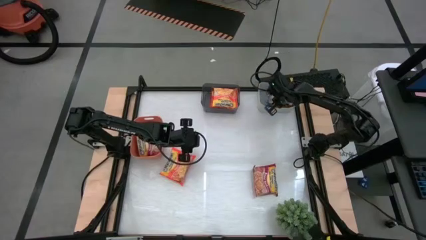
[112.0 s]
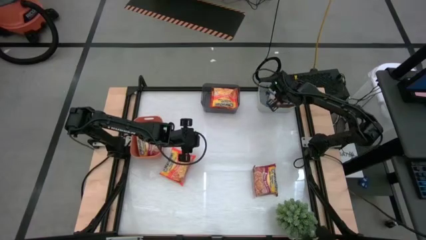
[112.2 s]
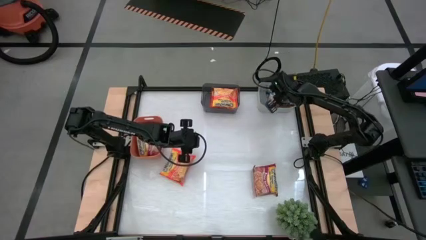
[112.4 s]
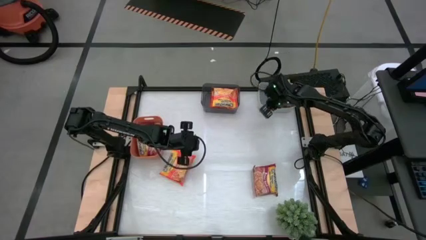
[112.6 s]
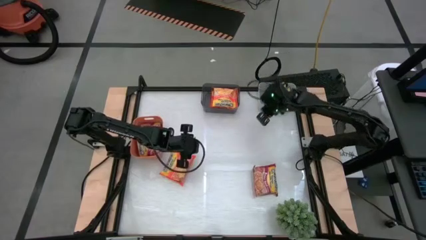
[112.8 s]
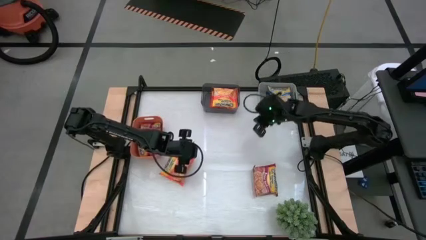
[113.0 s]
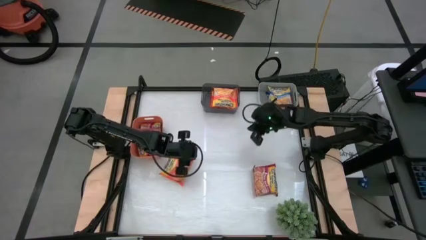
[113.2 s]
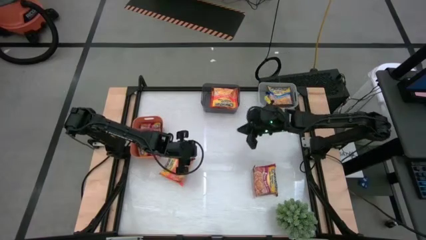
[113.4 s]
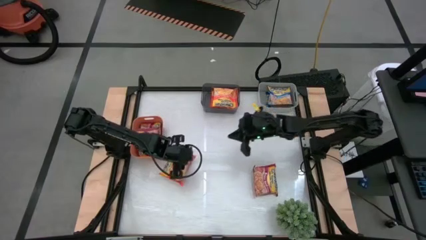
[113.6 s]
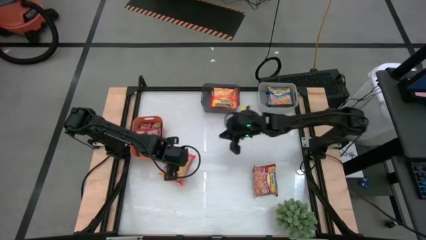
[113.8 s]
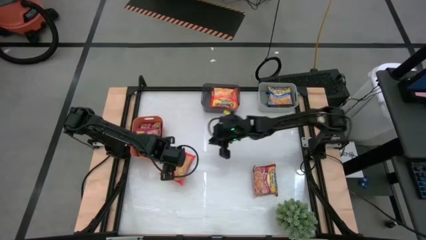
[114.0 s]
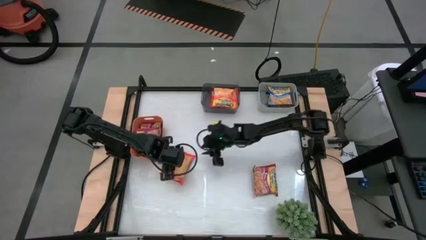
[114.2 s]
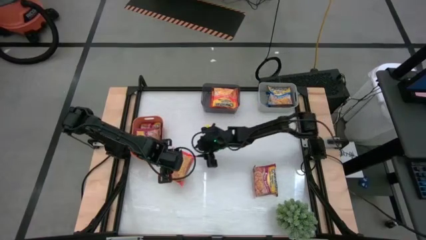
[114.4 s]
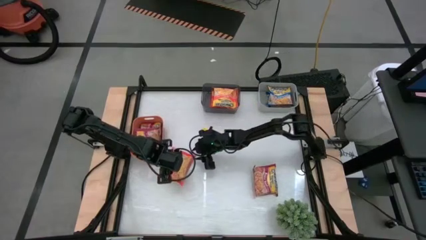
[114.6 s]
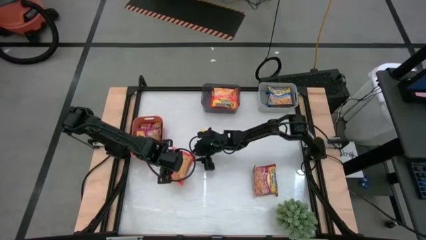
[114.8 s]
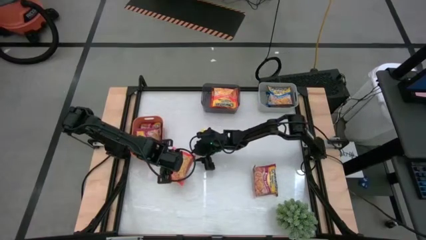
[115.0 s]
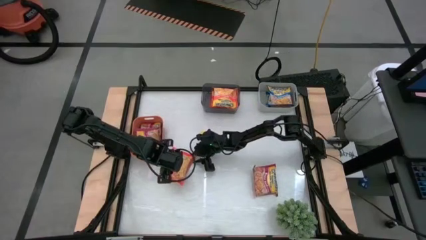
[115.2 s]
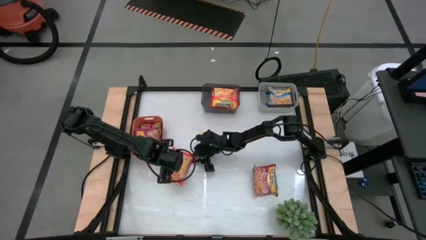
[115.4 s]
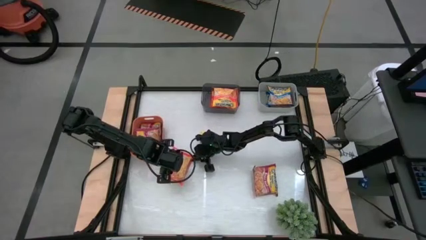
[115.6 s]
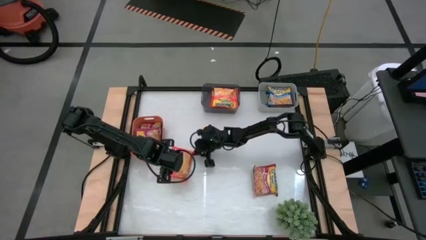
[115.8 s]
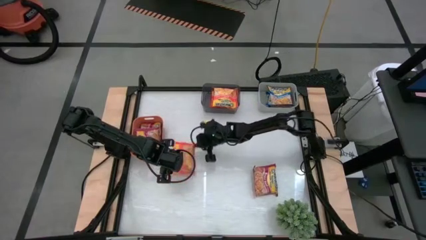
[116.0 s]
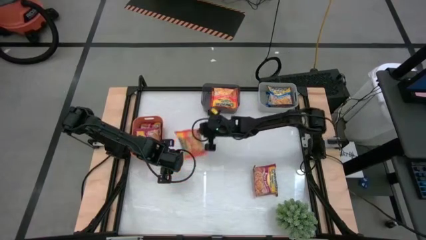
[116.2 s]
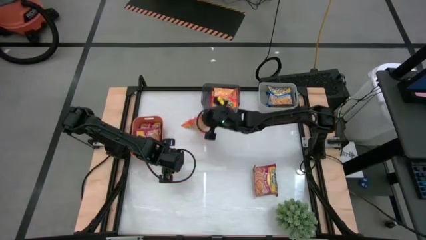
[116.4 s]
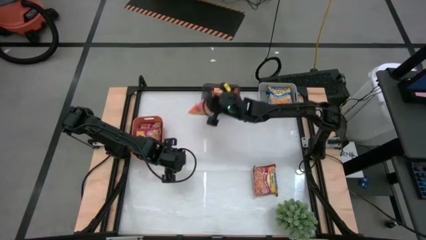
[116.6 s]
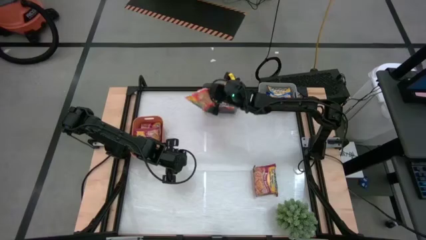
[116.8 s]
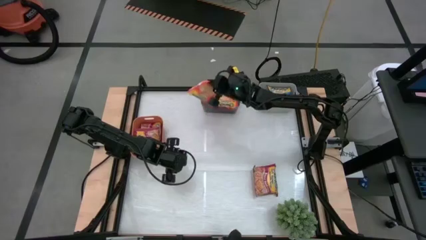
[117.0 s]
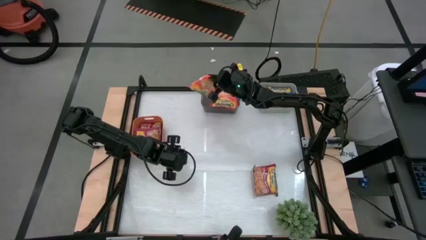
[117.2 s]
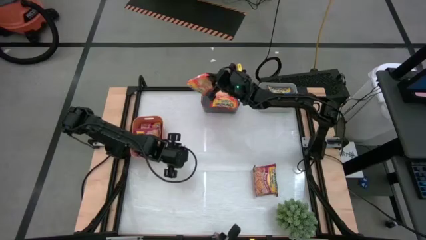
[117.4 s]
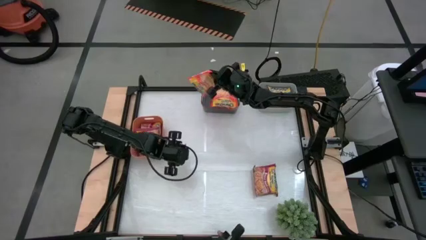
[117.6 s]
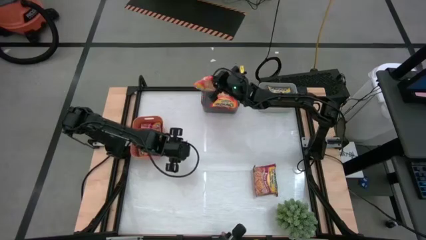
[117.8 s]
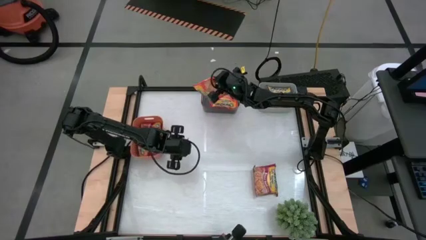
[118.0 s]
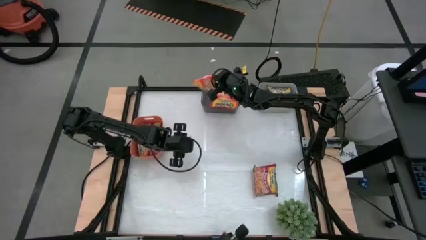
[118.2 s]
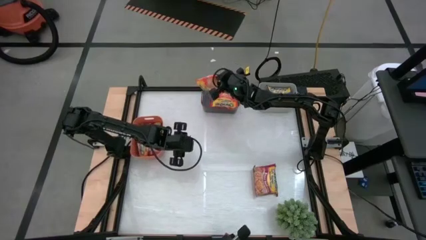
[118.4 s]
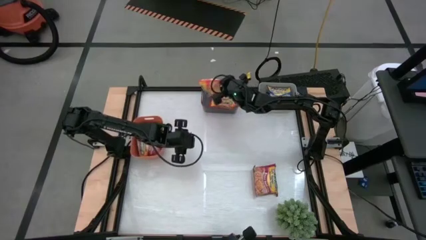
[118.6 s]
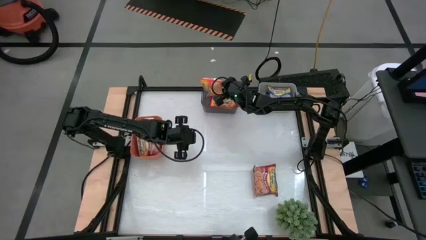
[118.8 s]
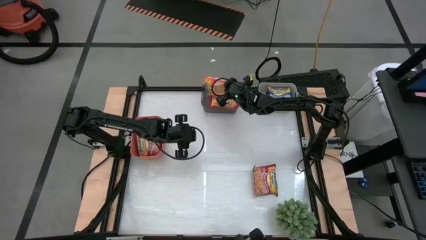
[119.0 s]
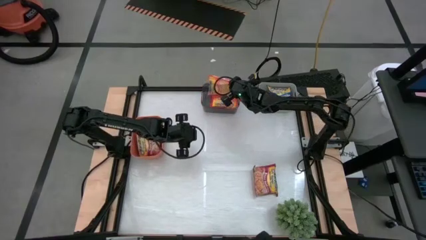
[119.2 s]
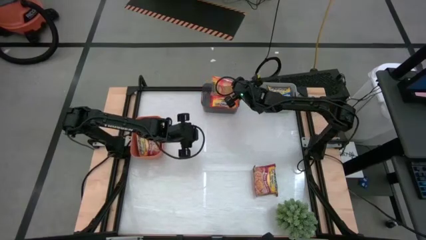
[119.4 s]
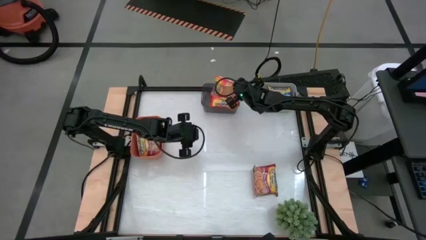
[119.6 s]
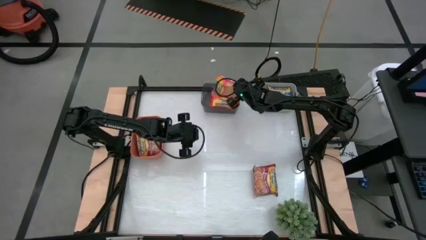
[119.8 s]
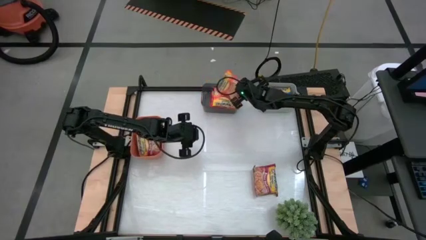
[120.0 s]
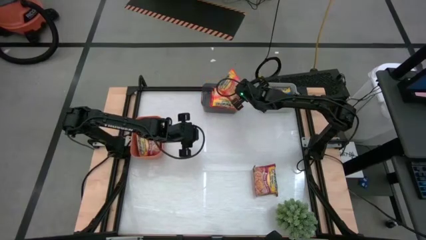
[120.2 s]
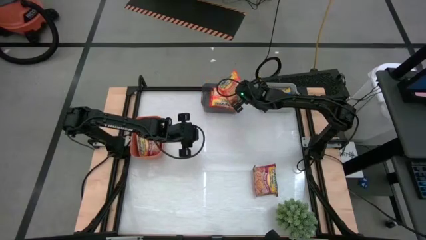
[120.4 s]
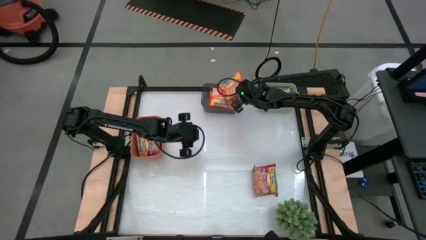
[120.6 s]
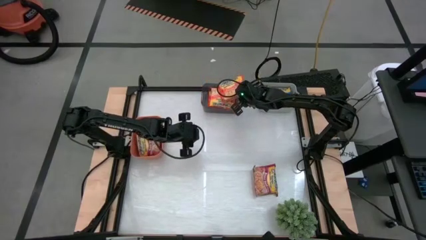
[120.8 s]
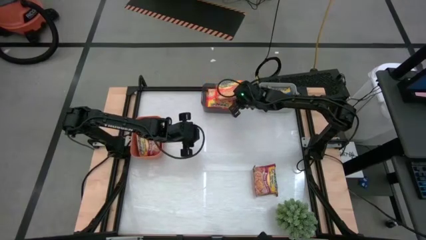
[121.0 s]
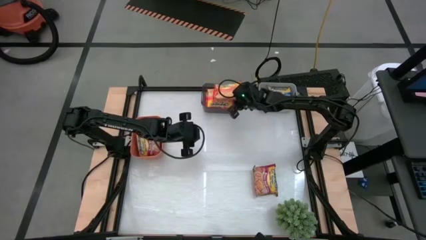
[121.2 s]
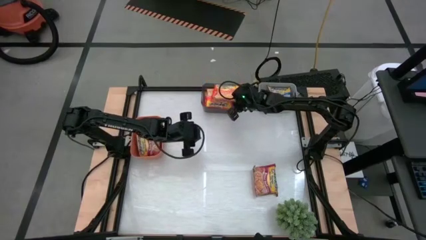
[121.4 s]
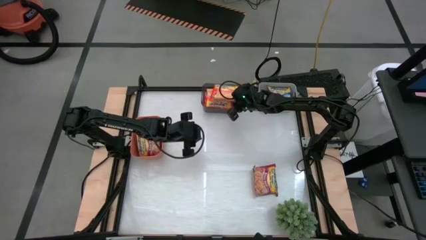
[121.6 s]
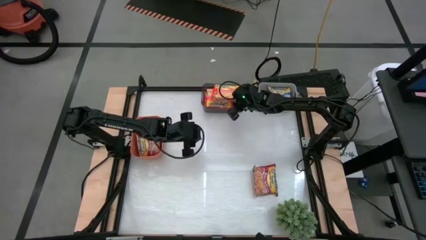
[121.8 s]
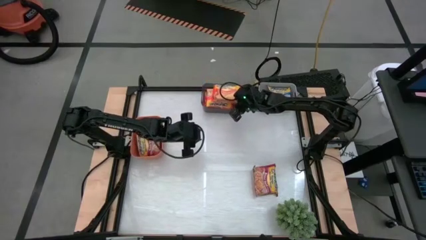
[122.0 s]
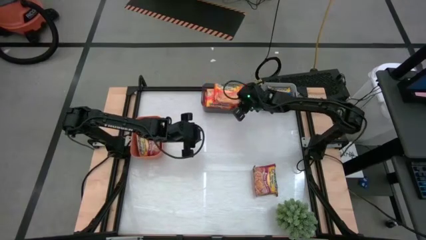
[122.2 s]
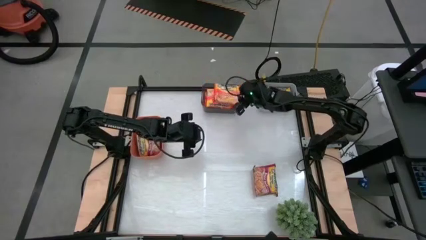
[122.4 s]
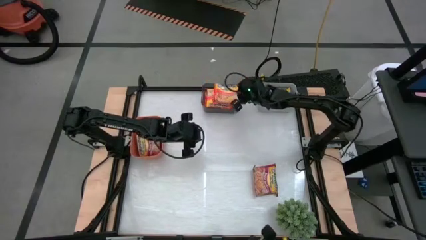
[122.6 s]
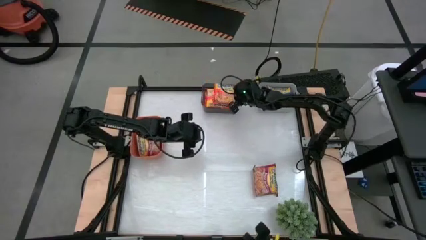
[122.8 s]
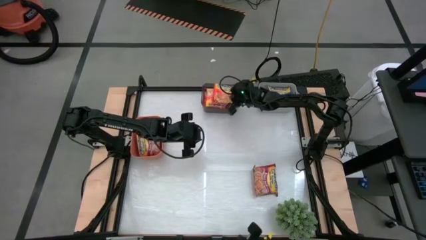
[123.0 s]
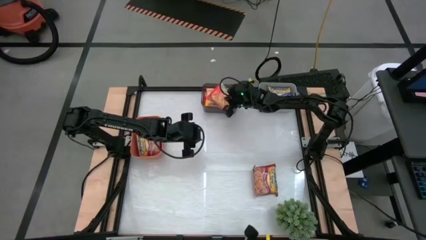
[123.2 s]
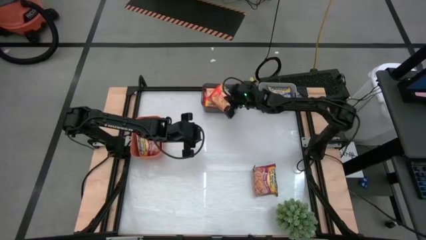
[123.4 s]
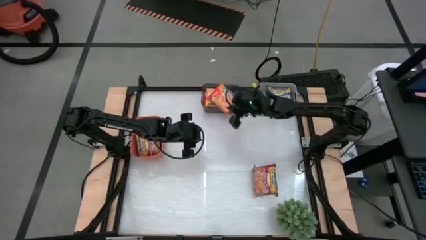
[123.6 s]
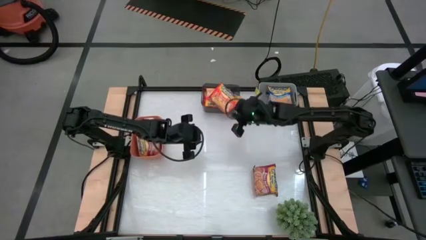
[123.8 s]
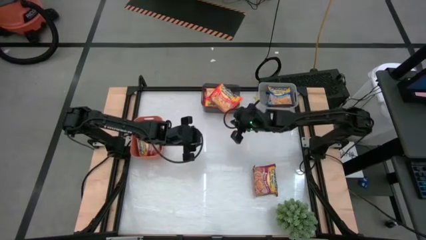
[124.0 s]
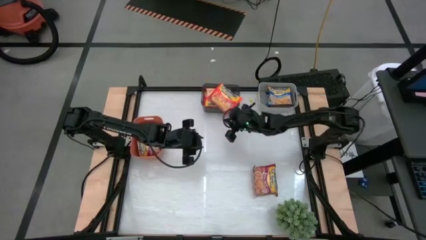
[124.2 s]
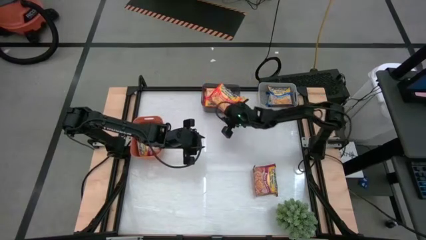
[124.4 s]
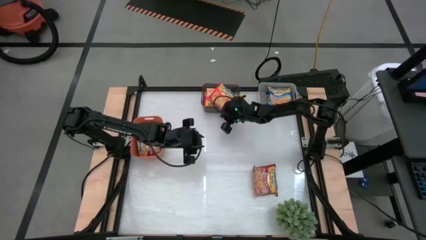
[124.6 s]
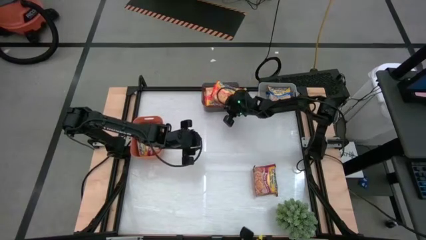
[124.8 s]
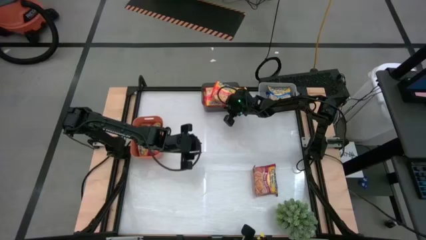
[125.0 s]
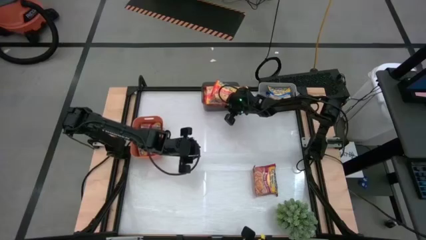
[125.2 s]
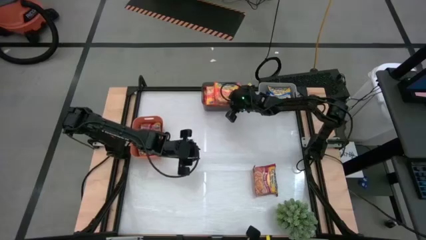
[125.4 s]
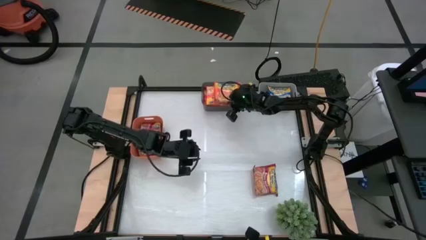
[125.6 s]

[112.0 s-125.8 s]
Task: Sort Maruchan noodles
Put the orange noodle pack into the black bin

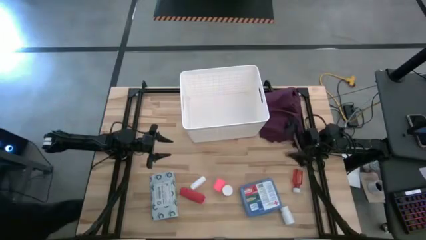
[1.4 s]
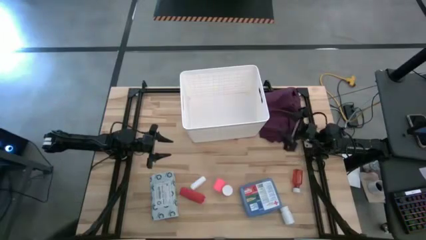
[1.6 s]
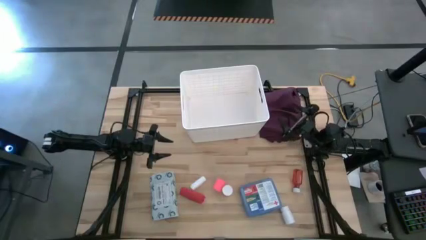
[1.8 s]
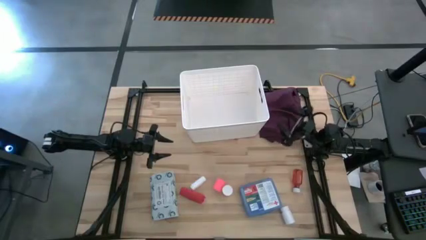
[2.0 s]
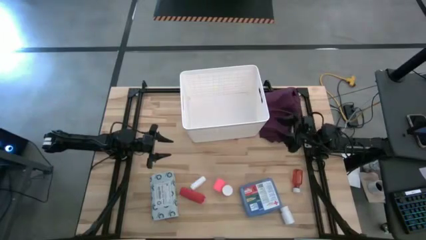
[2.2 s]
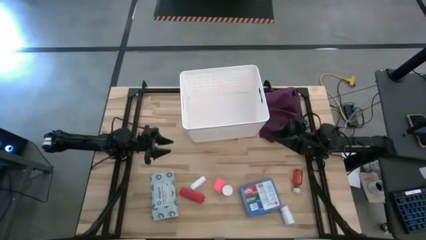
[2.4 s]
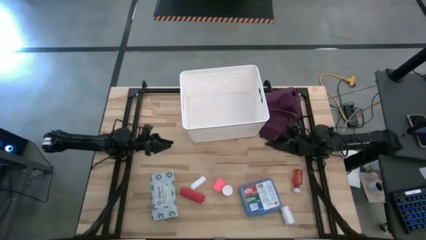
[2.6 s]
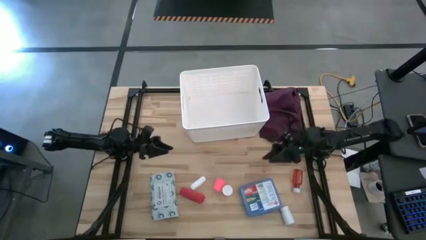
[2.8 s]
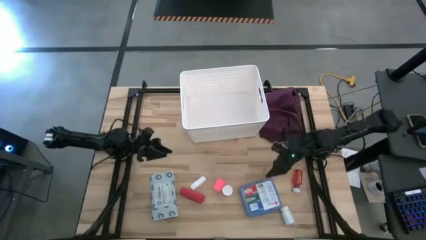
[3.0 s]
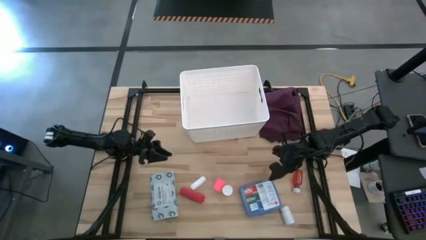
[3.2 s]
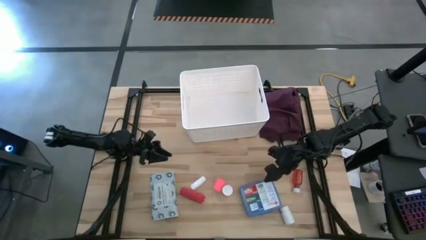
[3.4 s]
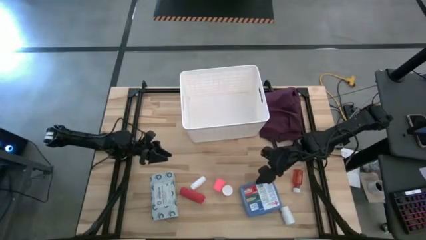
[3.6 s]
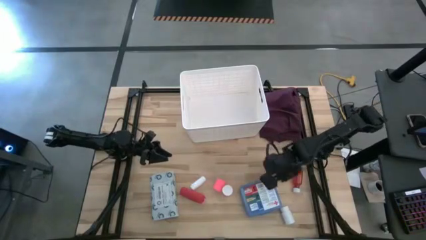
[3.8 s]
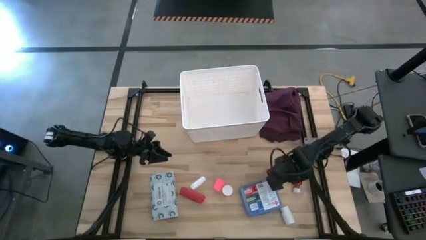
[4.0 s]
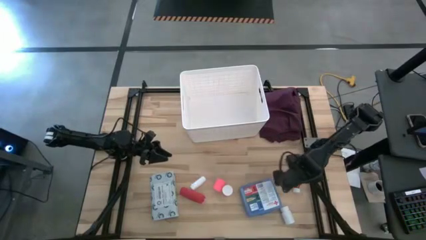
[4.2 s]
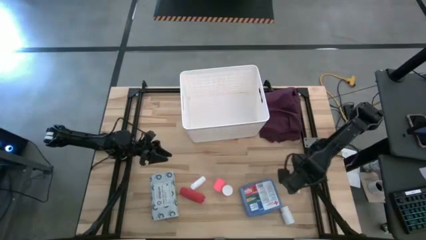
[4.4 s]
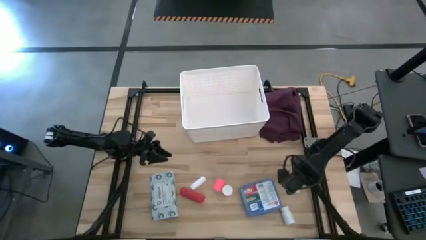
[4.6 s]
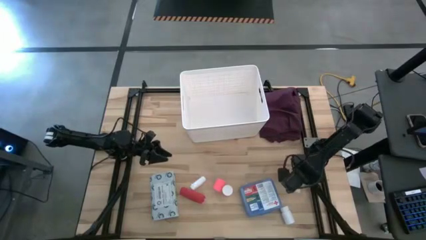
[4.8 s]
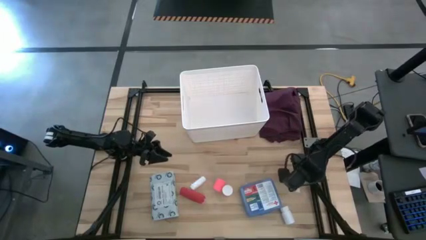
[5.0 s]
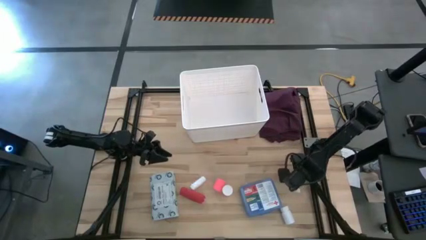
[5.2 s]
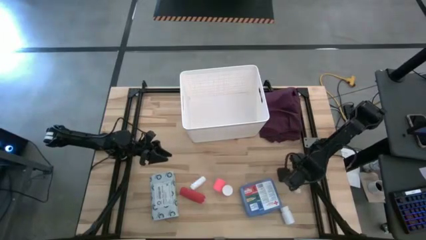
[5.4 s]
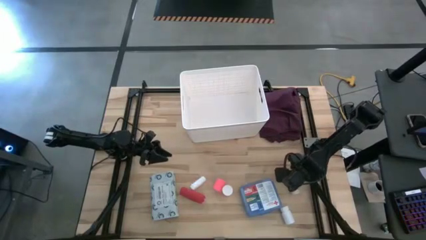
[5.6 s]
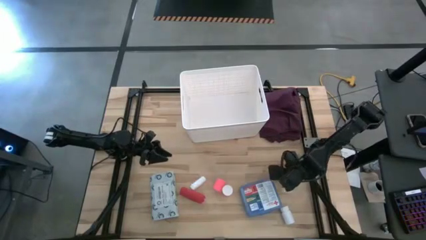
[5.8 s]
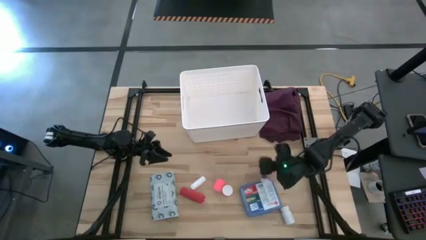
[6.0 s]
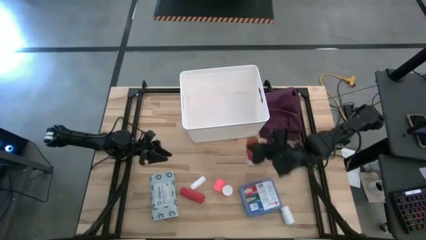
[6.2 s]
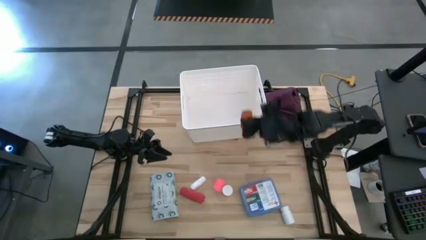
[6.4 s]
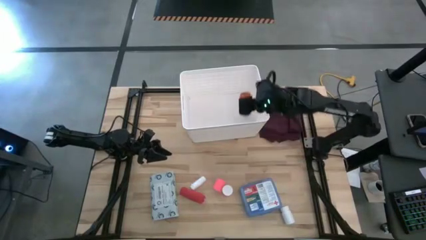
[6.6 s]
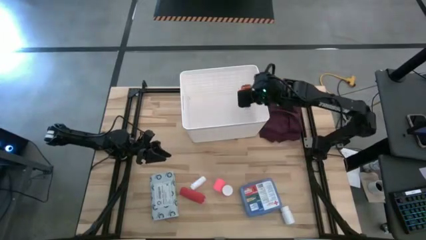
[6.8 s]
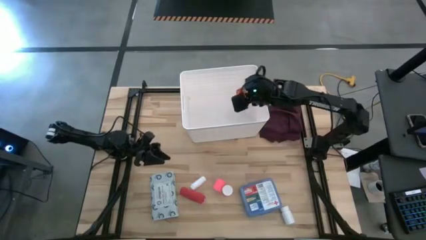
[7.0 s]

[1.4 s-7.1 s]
Task: Pick & place medical supplies in basket/bin
Put the red pill bottle into the white bin
